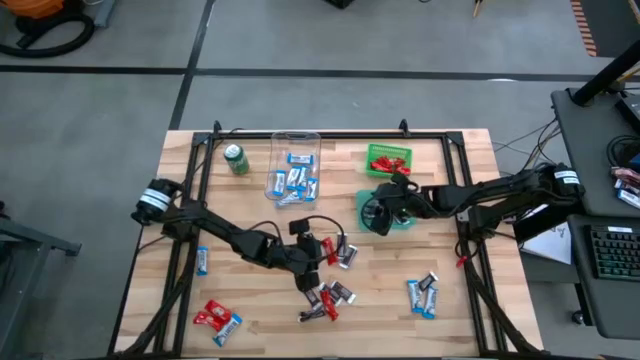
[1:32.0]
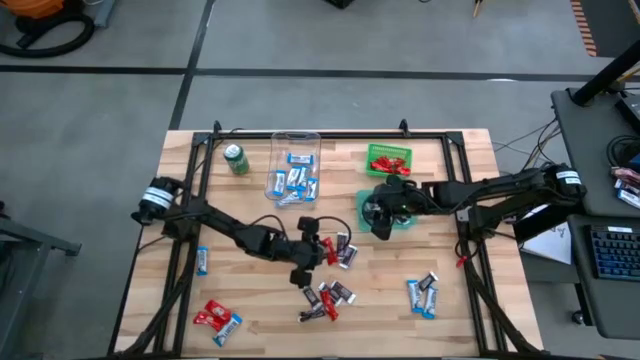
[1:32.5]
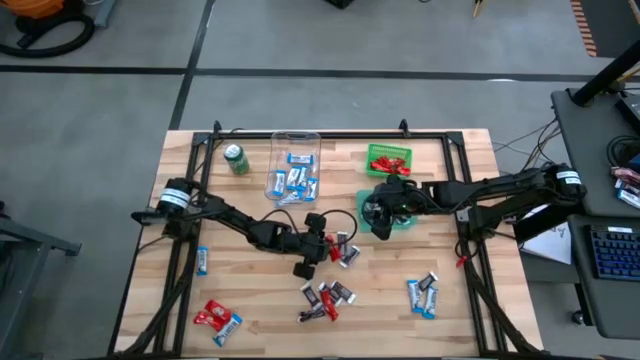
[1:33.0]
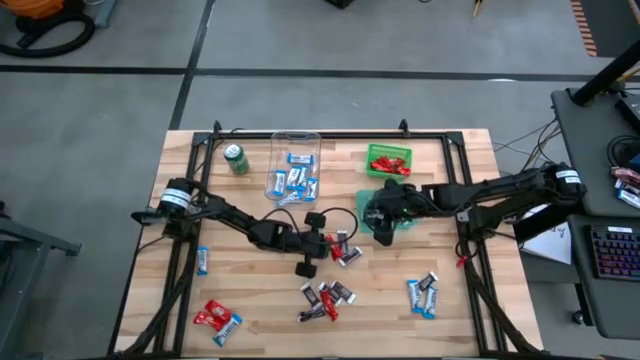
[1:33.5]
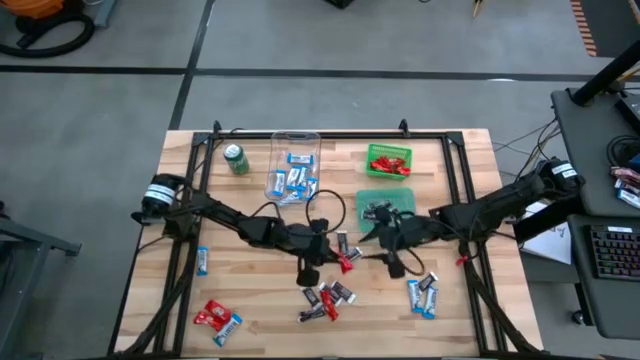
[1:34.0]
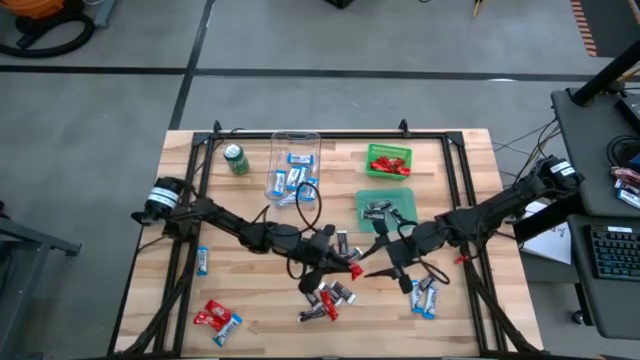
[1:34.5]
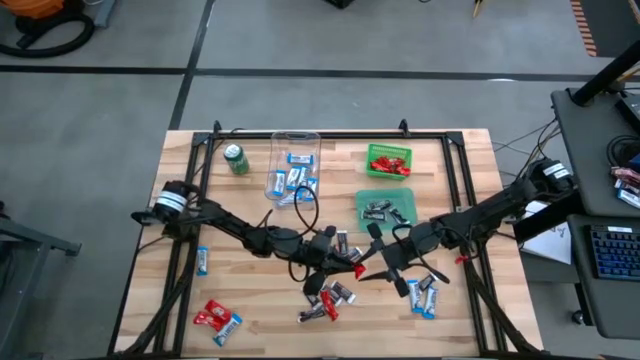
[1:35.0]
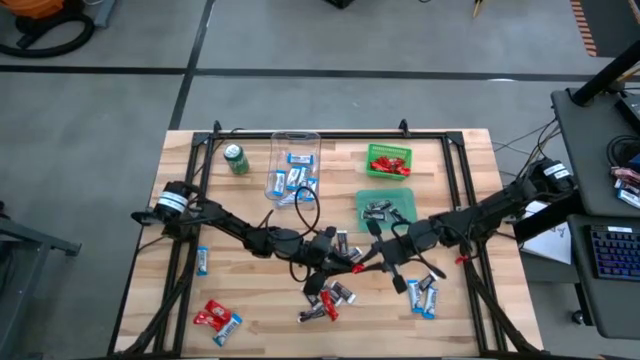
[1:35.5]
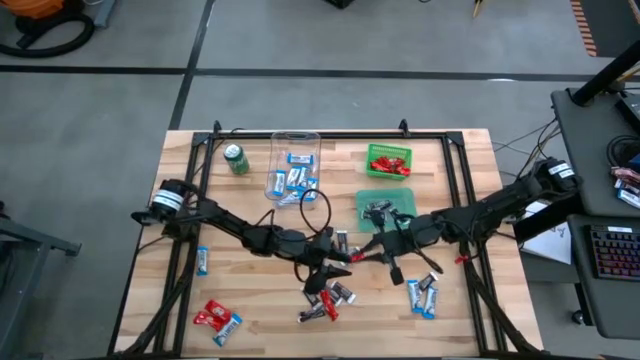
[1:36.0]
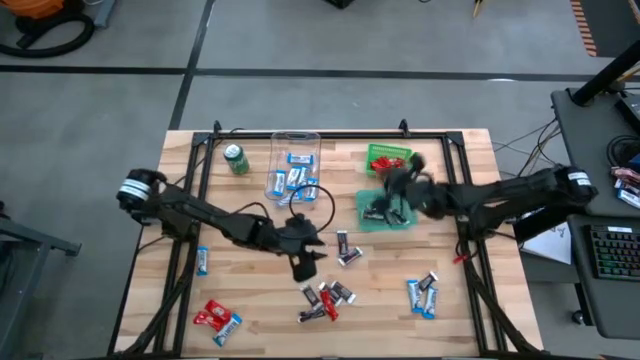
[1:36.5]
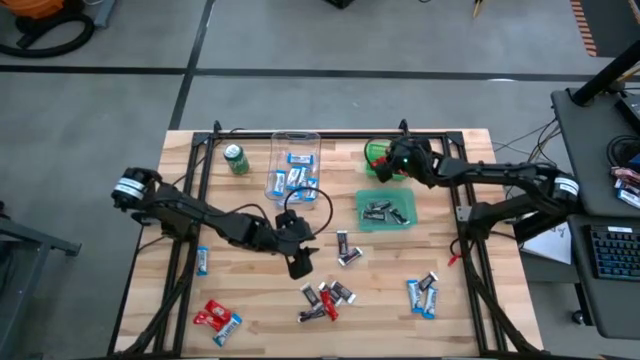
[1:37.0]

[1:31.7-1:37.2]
Task: Sort candy
Put the red candy into the green bin

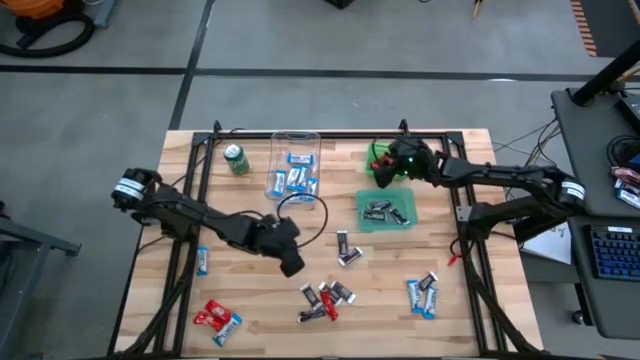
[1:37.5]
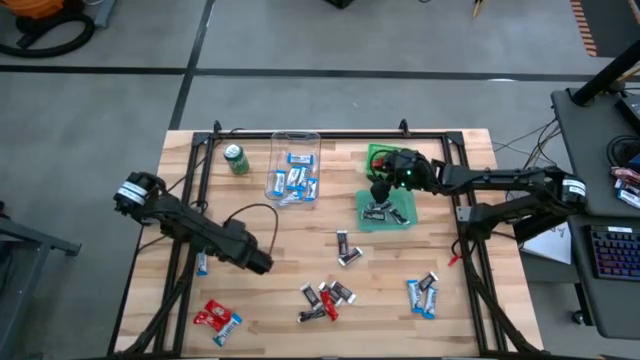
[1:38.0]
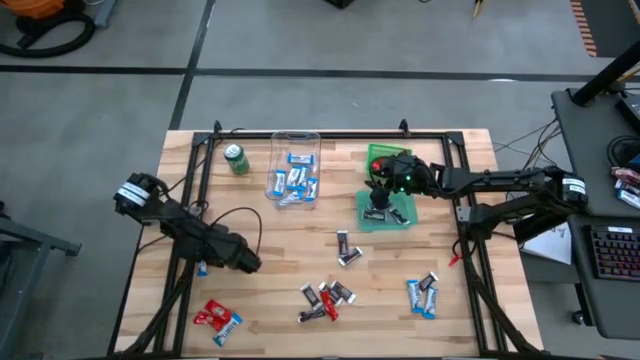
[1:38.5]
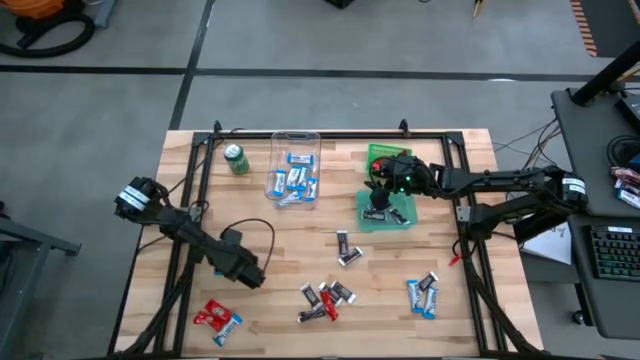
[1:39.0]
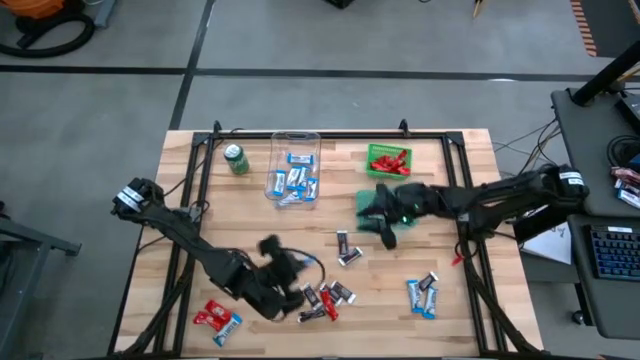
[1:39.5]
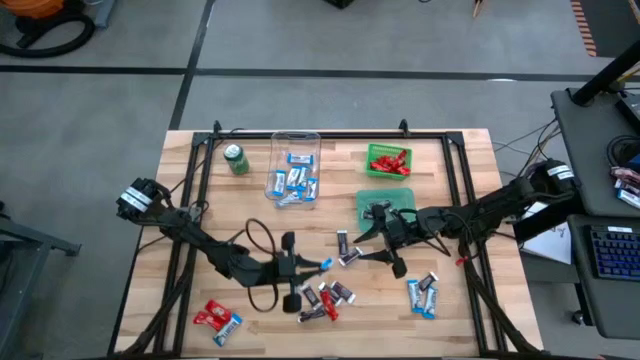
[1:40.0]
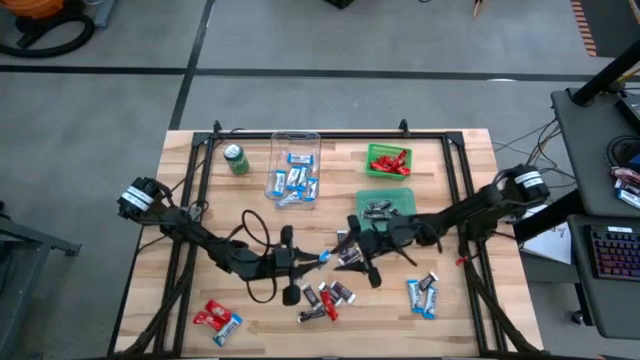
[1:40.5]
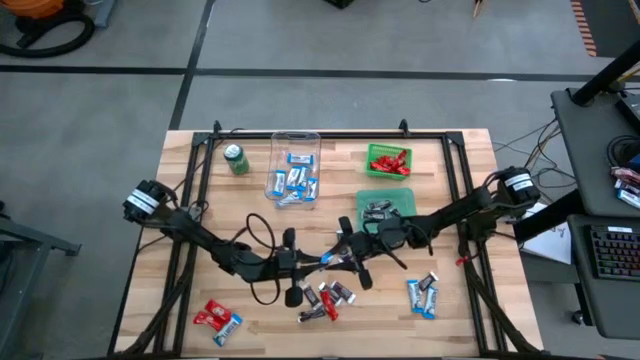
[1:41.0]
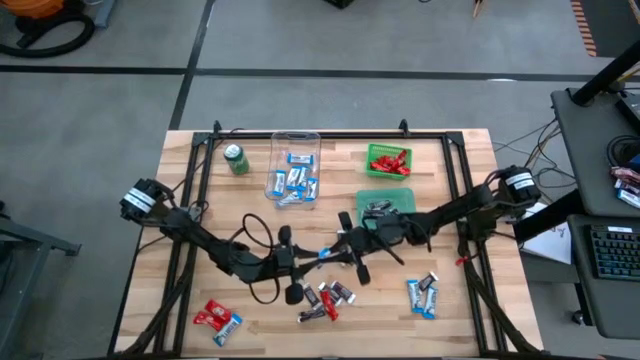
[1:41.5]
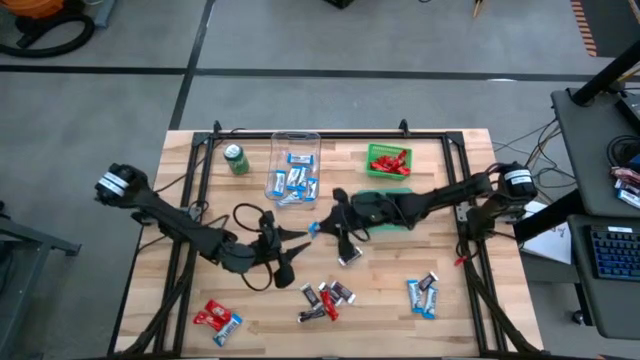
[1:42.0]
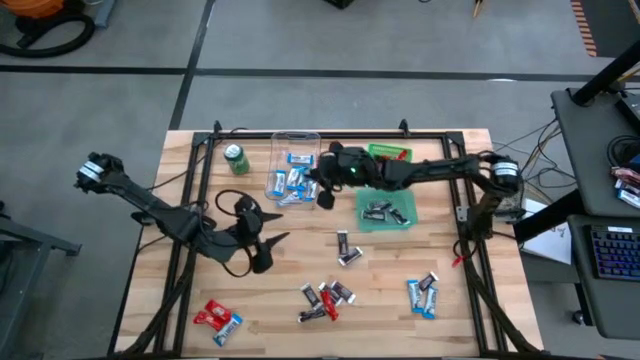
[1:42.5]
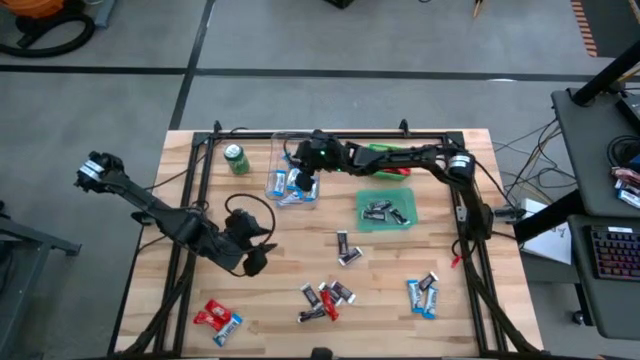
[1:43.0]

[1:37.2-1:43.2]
Put the white candy into the transparent bin

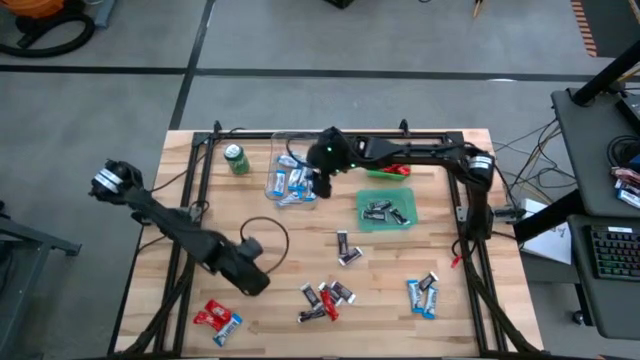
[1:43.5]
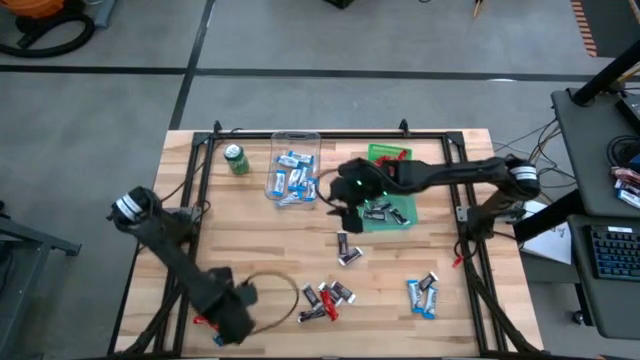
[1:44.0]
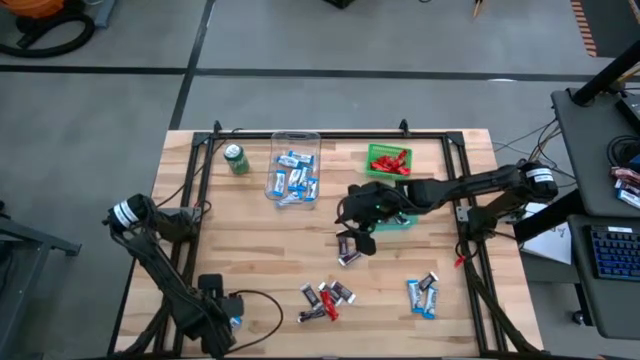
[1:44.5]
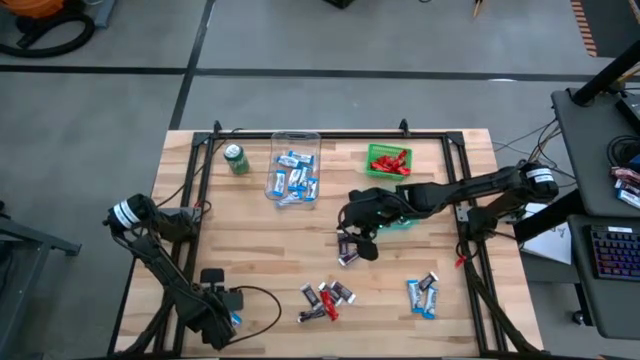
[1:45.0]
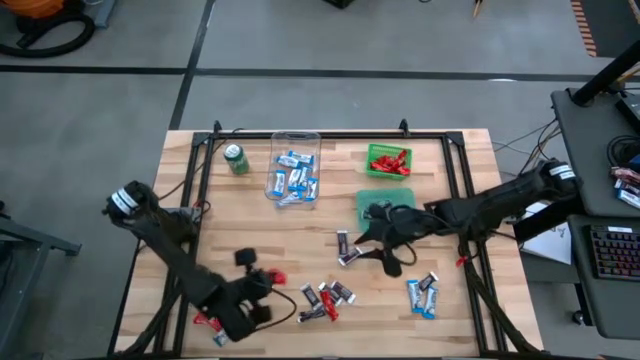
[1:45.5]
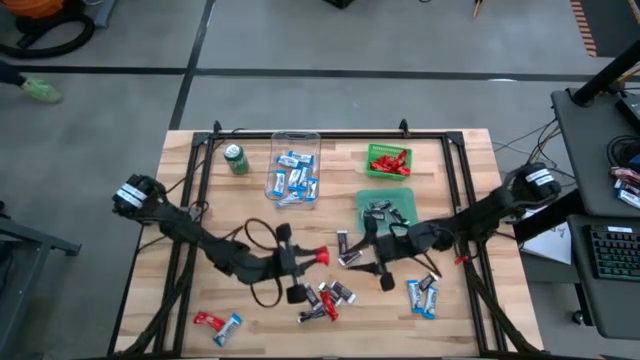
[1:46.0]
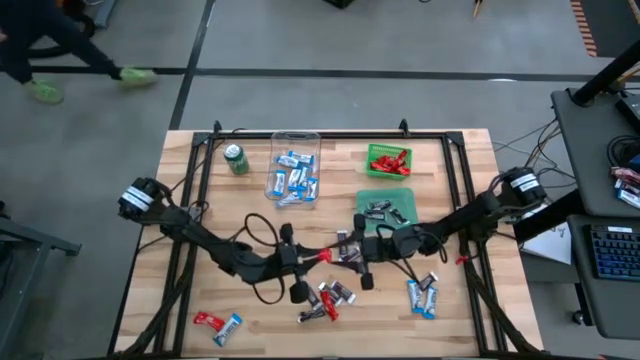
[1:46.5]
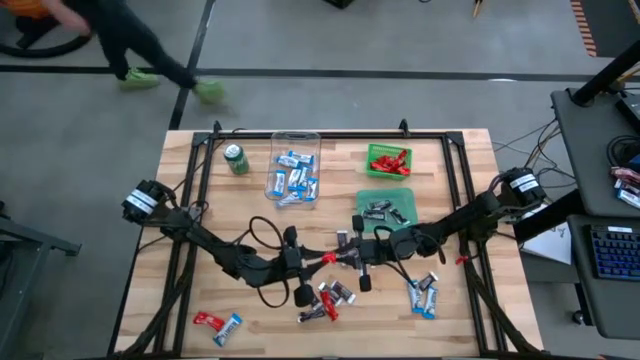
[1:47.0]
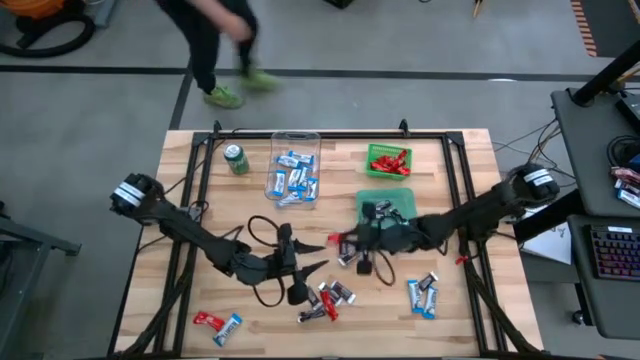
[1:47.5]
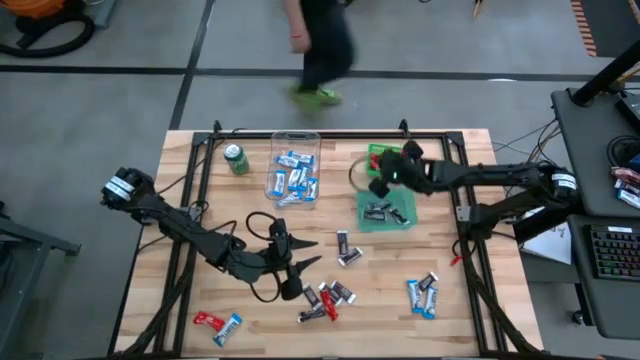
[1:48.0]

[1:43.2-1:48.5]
Put the red candy into the green bin

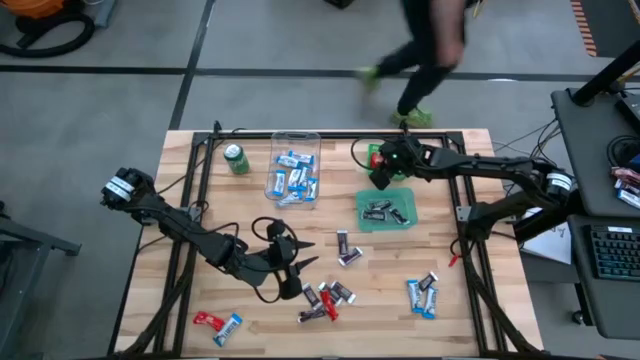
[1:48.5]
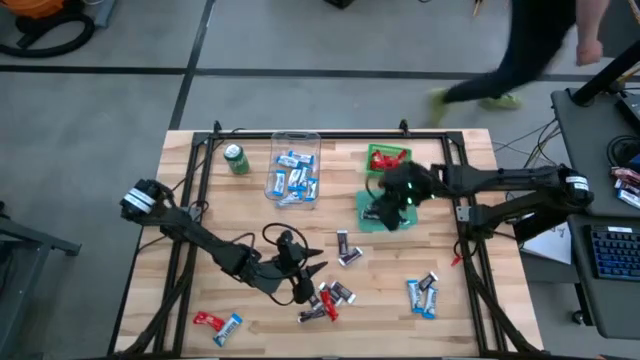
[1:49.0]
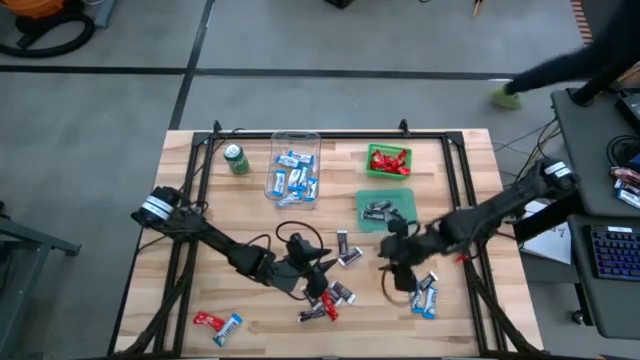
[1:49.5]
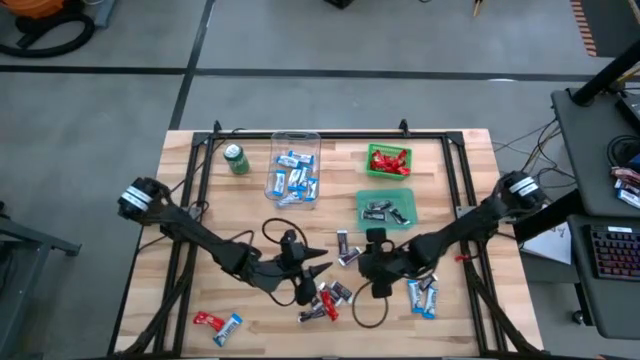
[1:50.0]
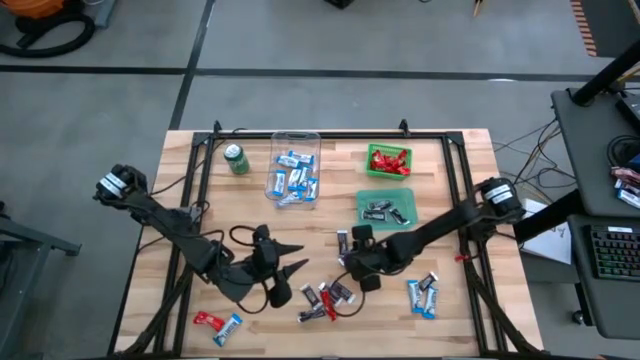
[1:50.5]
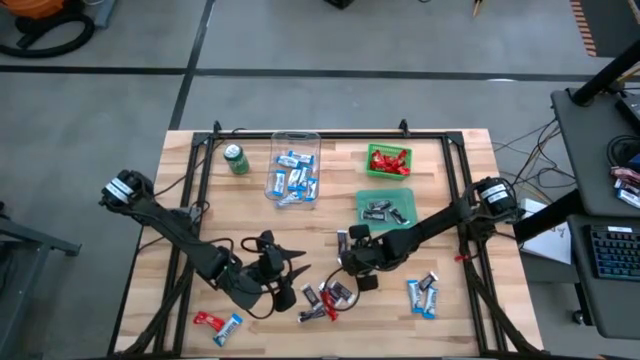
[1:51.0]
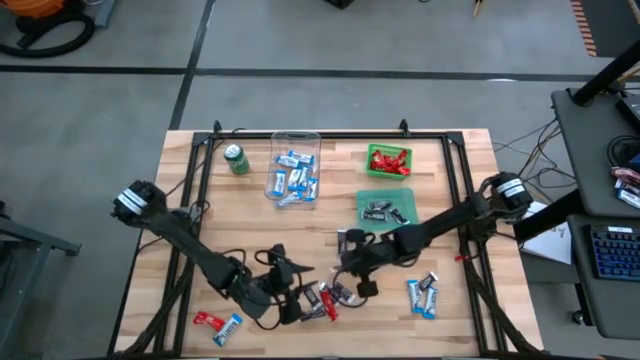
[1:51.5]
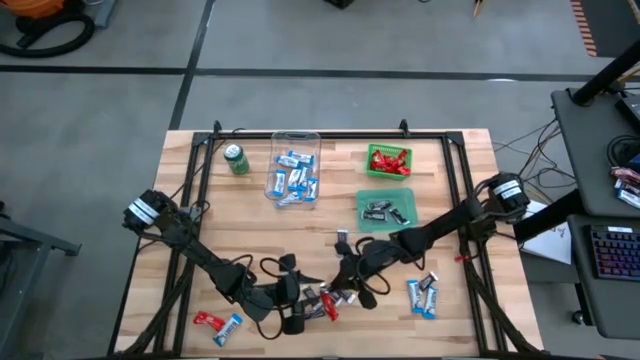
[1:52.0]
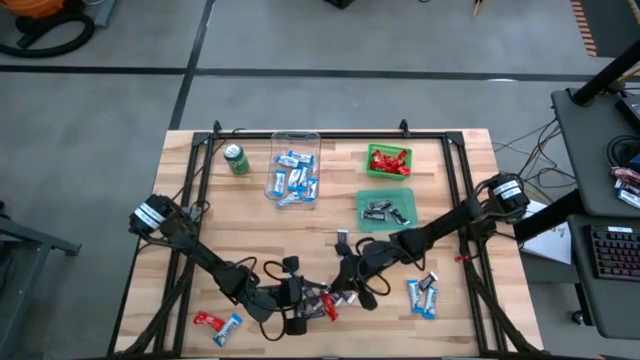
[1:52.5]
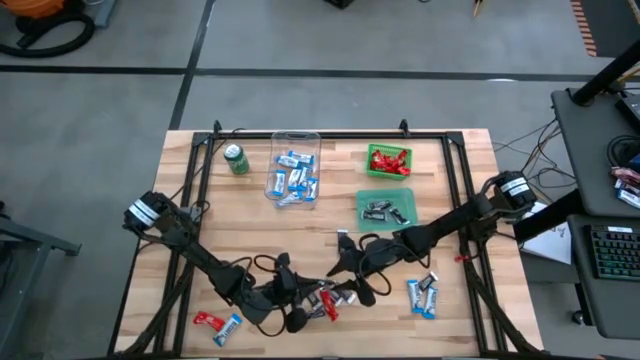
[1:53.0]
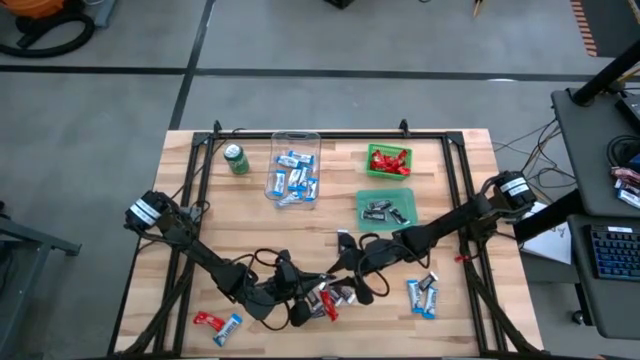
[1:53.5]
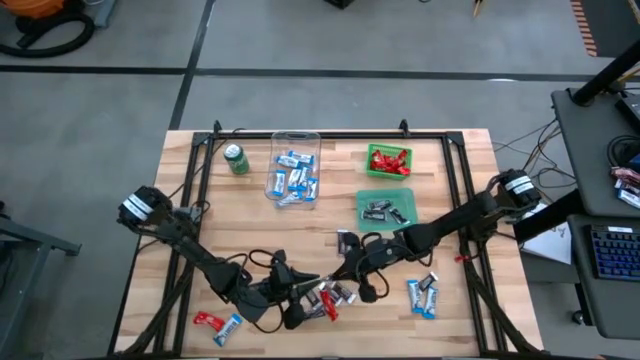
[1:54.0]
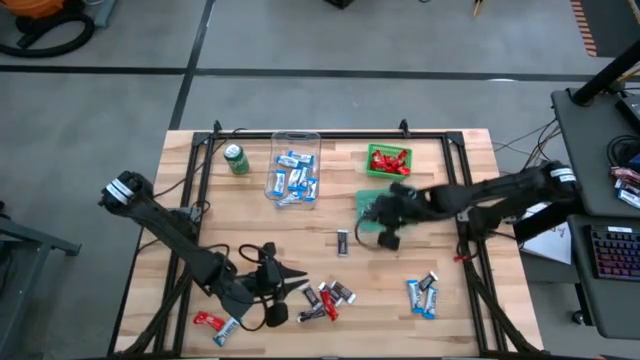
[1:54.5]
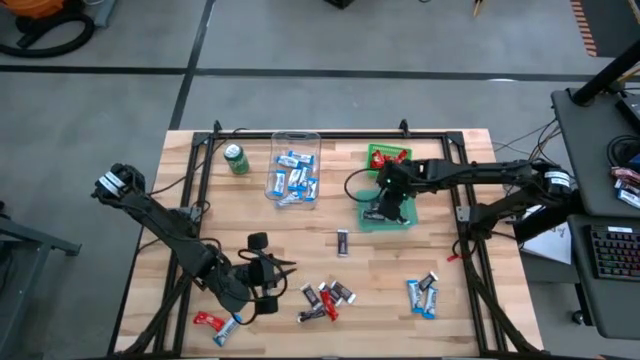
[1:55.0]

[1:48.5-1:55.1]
Put the brown candy into the blue bin
